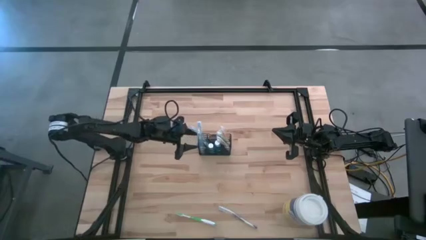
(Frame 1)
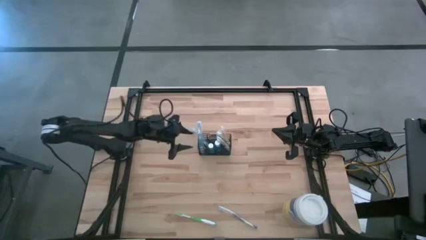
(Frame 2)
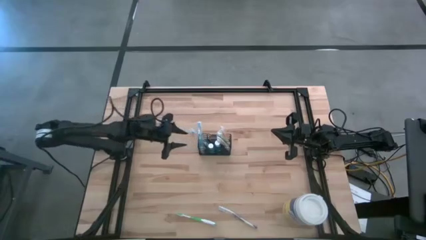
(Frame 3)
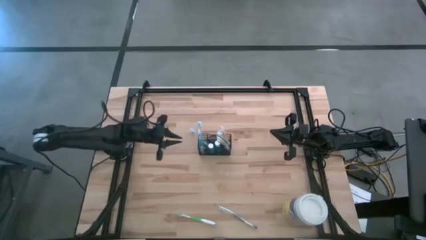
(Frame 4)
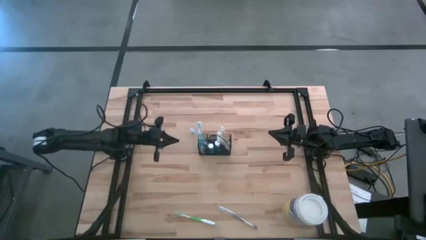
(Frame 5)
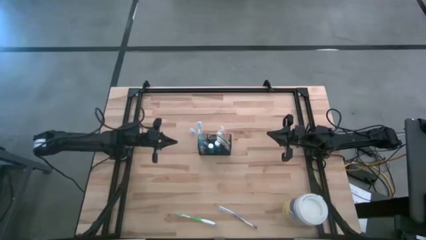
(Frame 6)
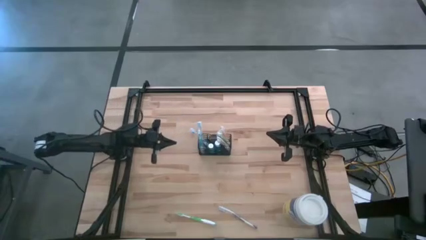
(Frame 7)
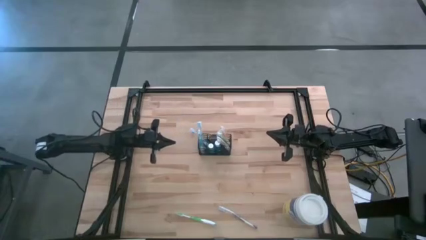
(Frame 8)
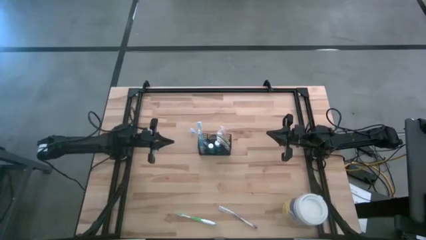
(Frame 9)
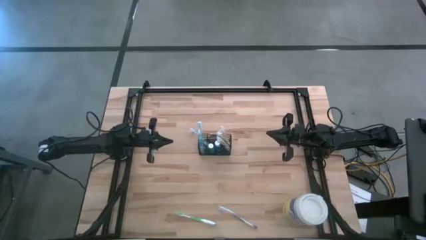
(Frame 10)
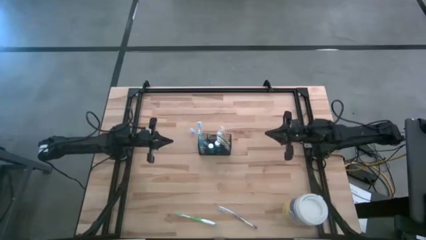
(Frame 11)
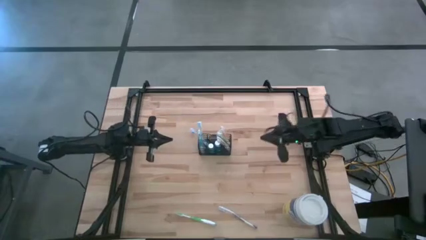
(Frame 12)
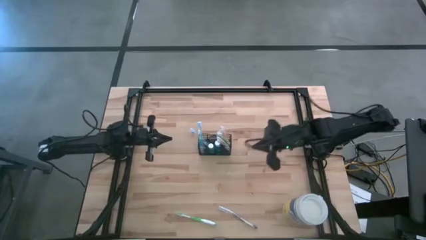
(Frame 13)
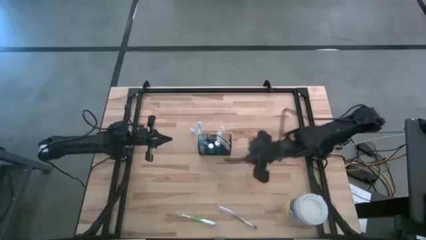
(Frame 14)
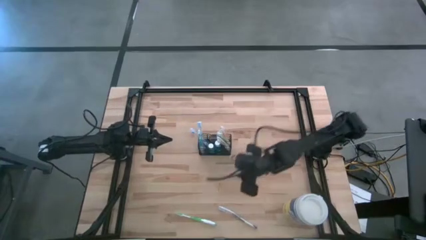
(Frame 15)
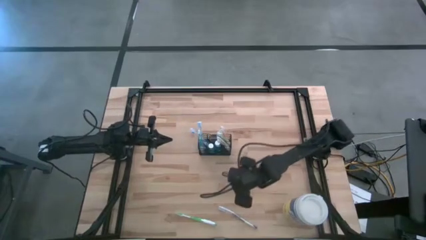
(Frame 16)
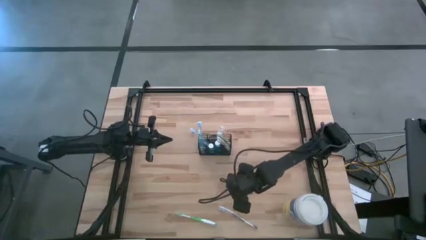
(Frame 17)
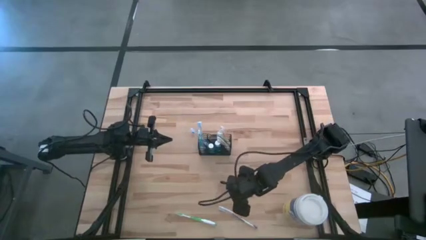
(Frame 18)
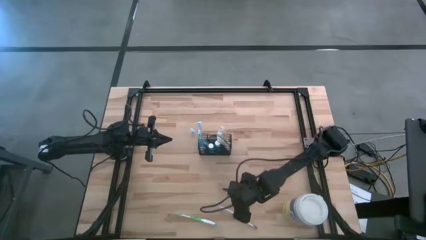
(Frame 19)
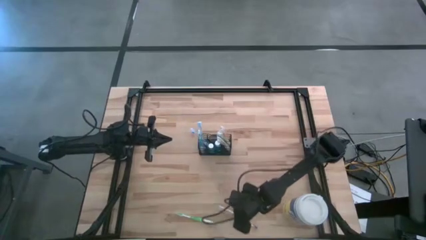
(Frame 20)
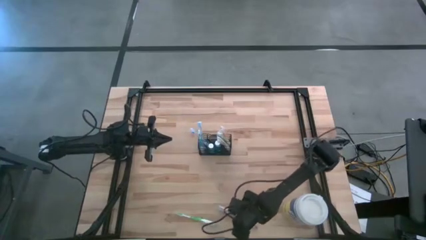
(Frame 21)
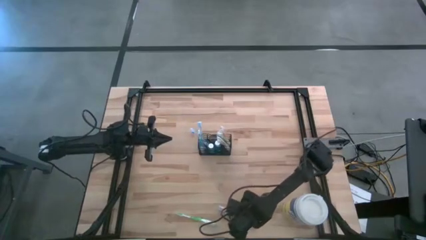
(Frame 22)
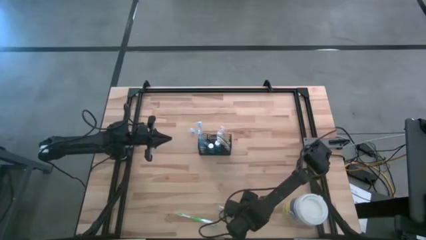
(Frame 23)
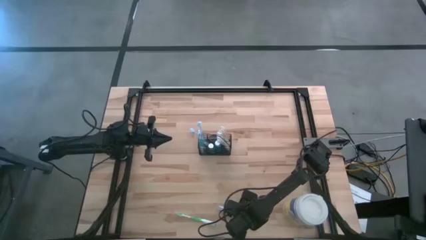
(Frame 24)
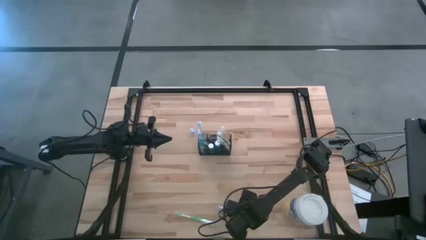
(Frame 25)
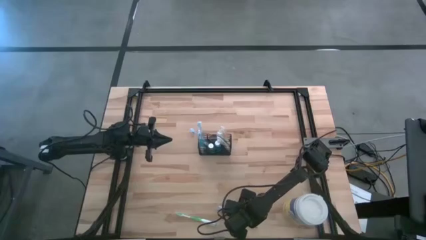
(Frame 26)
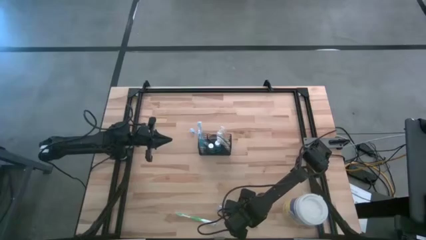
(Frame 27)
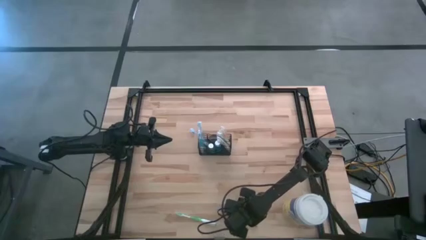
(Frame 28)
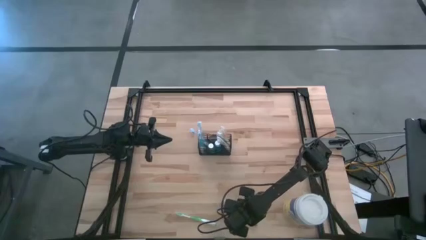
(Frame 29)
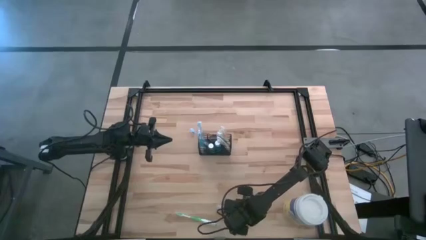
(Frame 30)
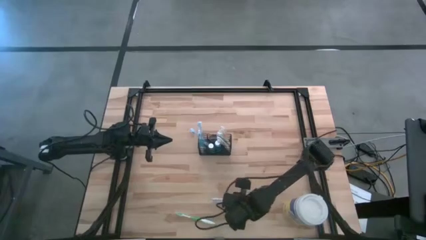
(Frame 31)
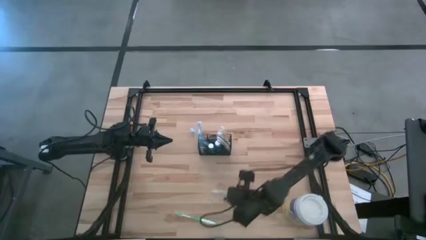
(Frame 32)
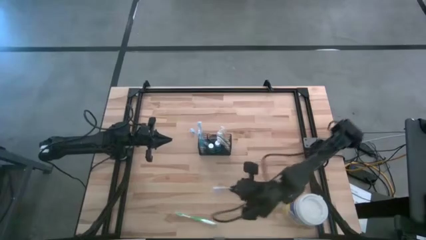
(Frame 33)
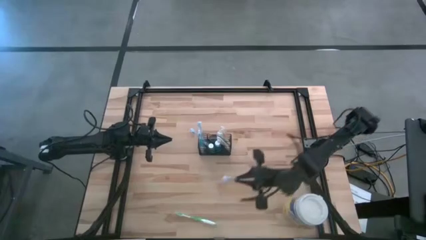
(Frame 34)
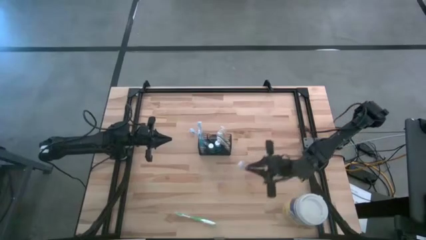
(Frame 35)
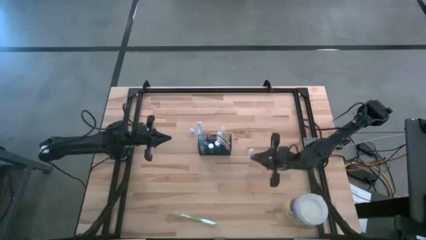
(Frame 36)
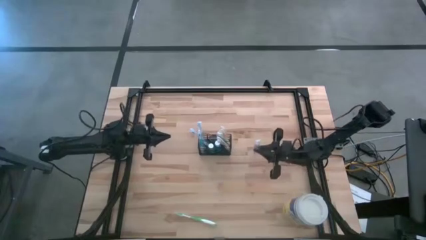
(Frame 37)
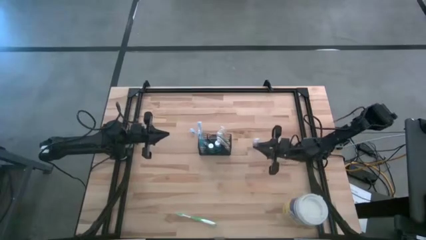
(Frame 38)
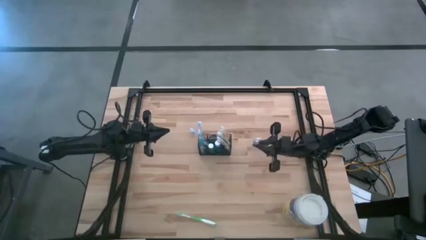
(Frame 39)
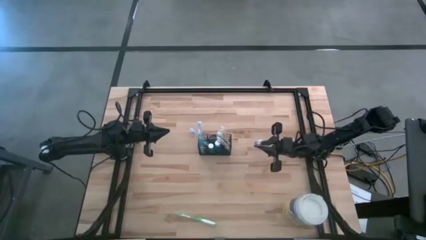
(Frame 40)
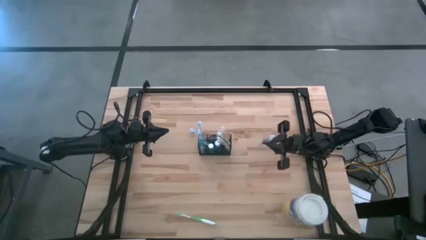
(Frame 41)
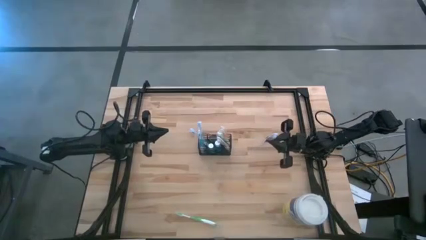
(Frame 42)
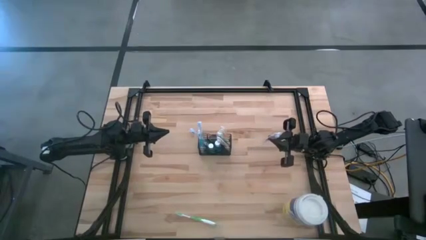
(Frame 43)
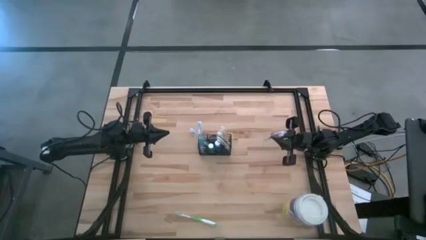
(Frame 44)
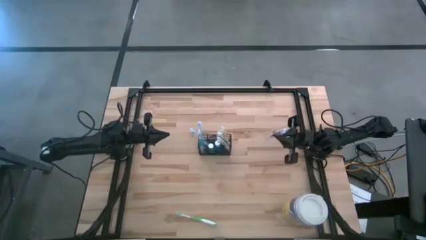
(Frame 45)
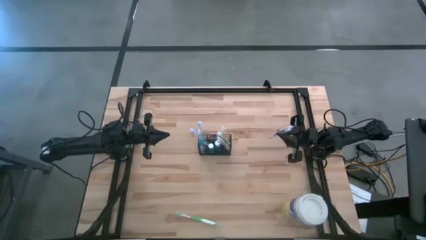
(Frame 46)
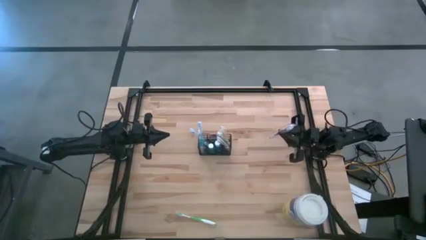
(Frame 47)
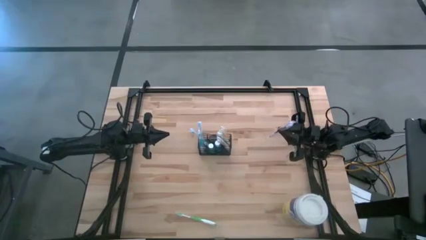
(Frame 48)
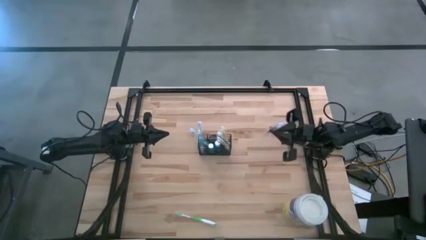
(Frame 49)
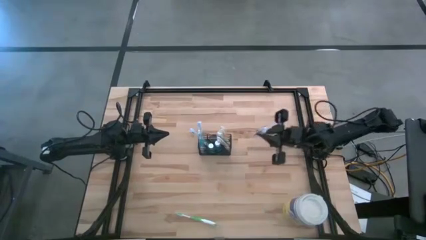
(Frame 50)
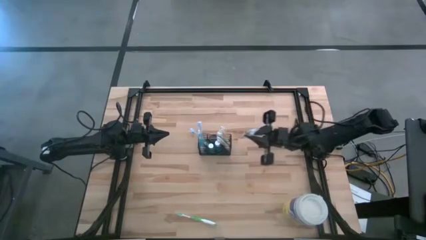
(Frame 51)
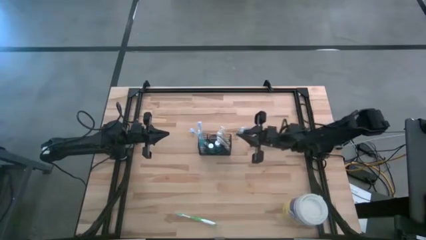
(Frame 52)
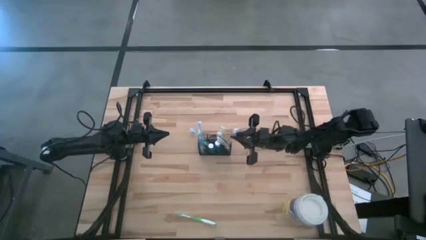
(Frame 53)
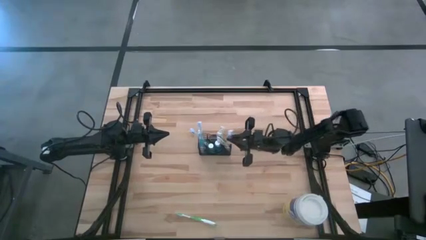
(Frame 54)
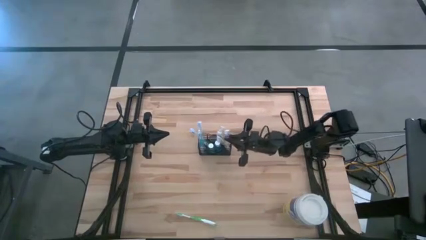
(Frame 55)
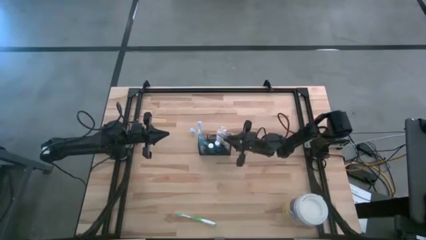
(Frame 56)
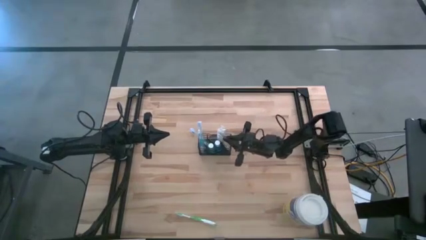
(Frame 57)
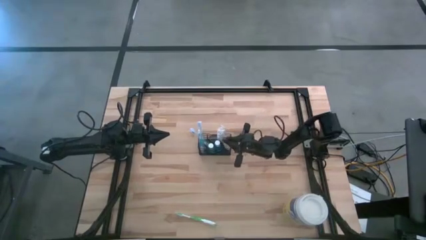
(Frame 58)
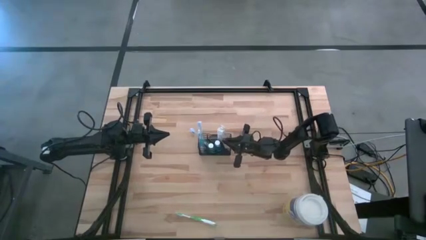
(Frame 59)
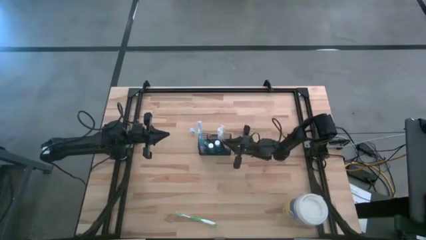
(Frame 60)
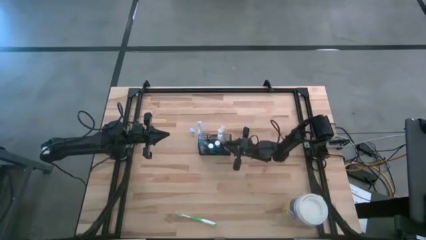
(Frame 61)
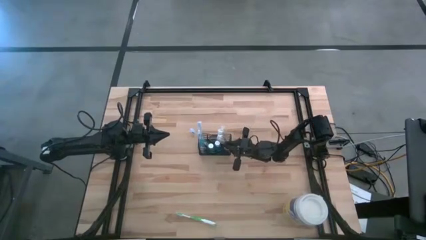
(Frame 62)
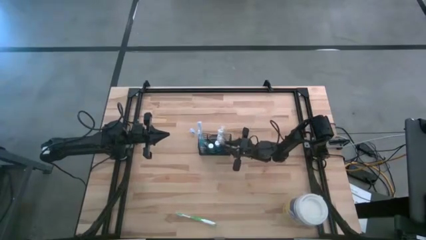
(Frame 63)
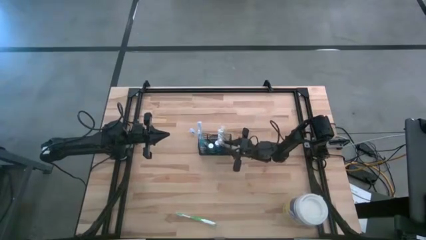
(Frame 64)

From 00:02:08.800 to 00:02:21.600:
Task: Pick & Place toothbrushing station
Put the purple toothbrush into the black mesh organizer
